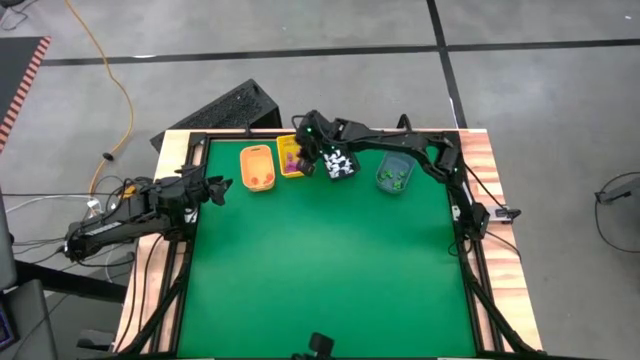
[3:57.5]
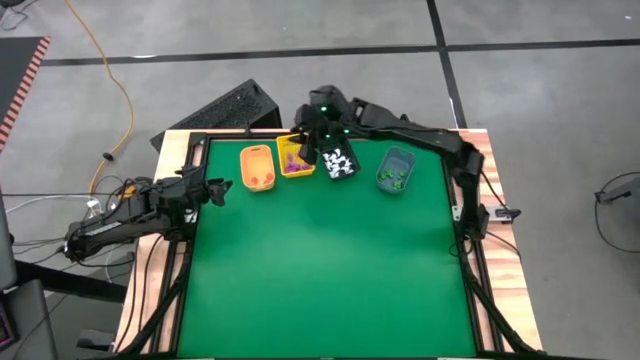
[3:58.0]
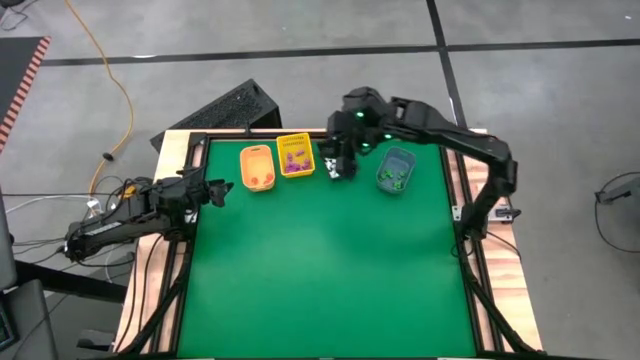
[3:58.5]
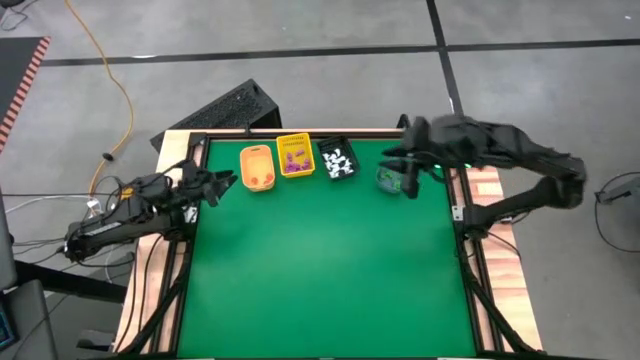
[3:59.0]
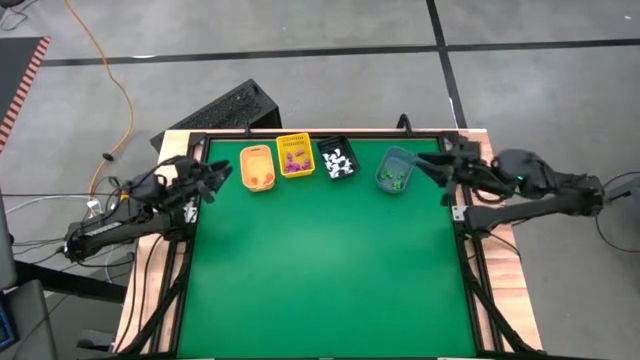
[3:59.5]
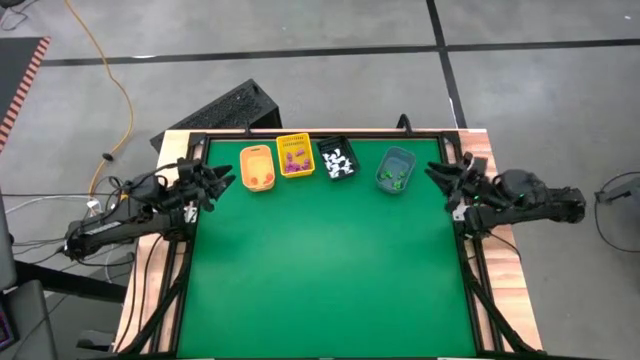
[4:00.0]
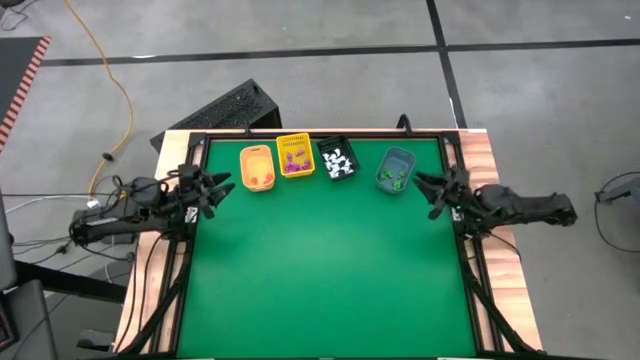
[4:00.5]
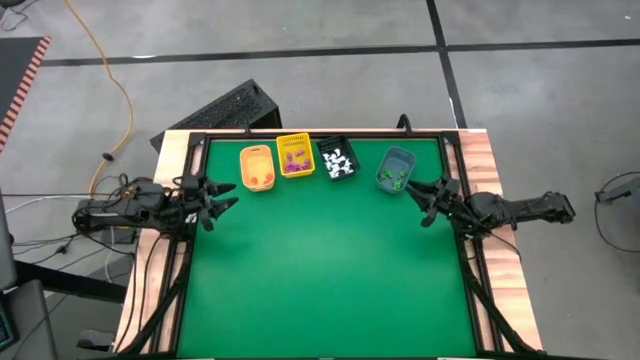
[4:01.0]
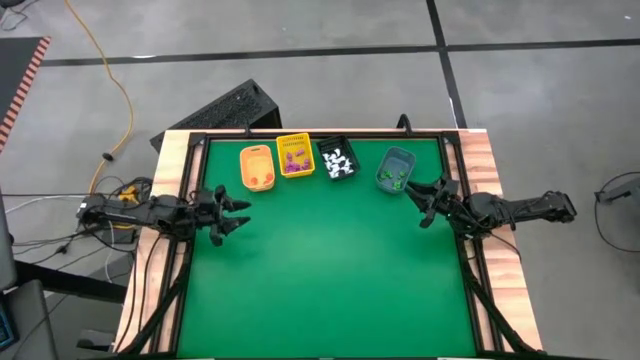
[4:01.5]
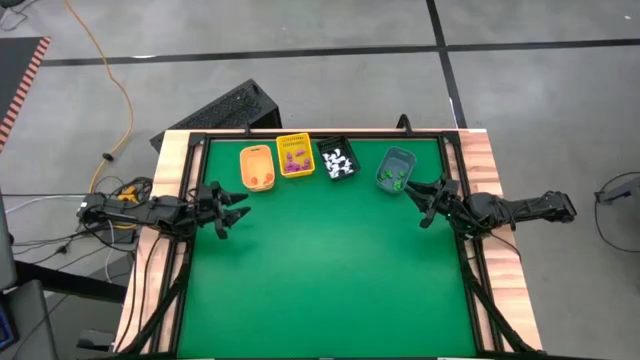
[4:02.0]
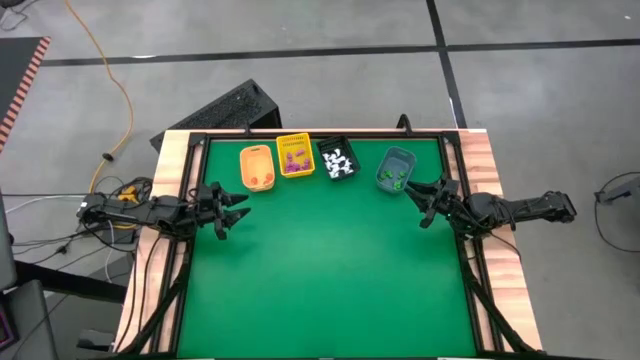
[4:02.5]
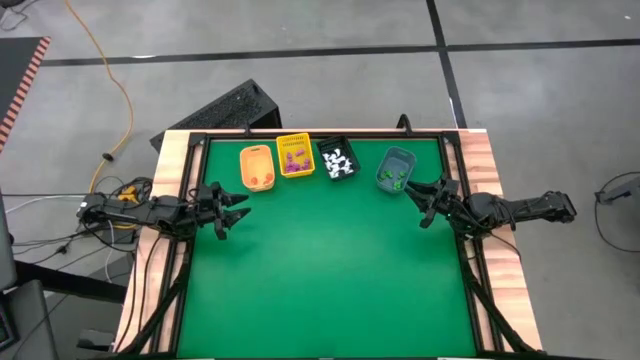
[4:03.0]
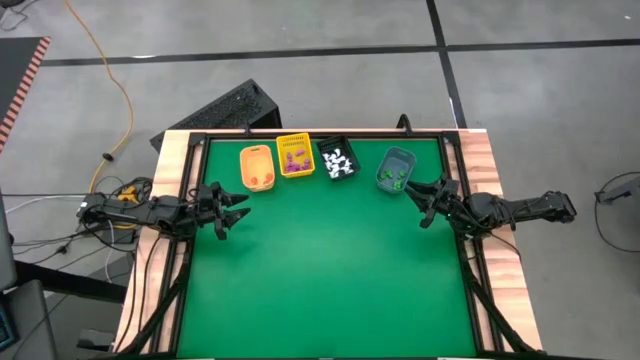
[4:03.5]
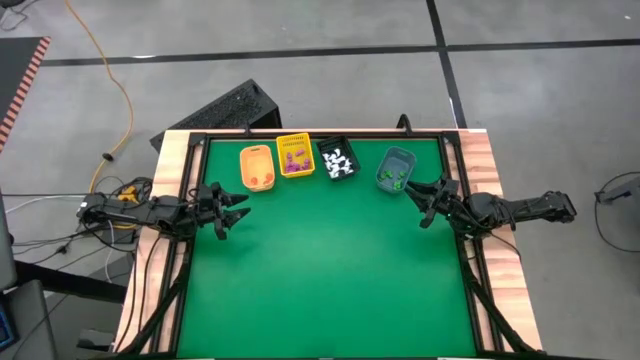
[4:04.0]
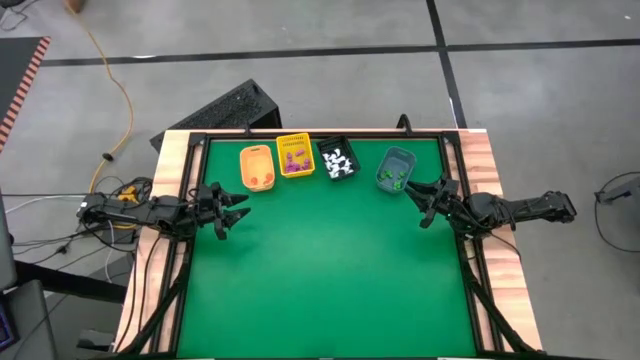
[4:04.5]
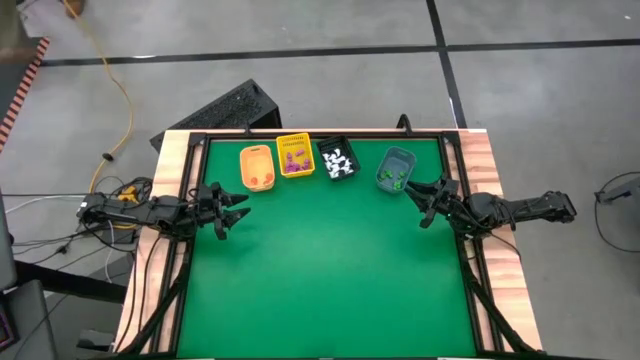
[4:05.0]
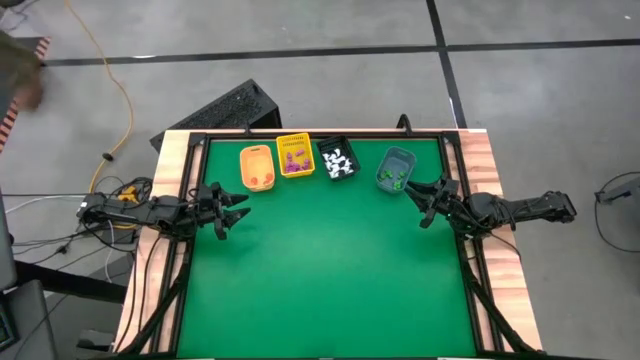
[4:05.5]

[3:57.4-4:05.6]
Task: Sort Halloween decoration
Return to Home Position

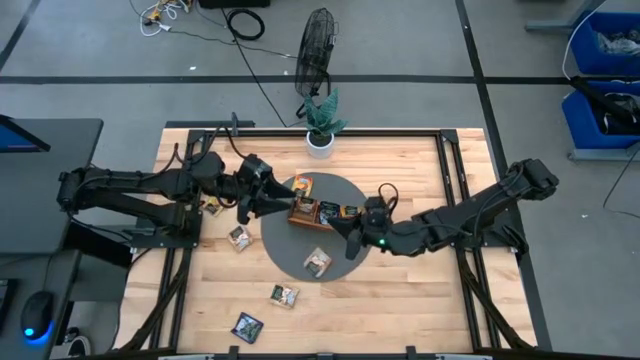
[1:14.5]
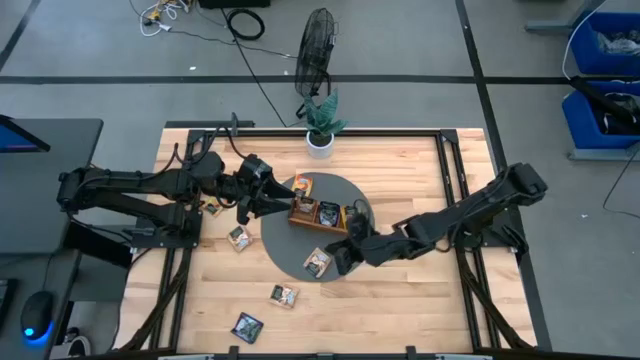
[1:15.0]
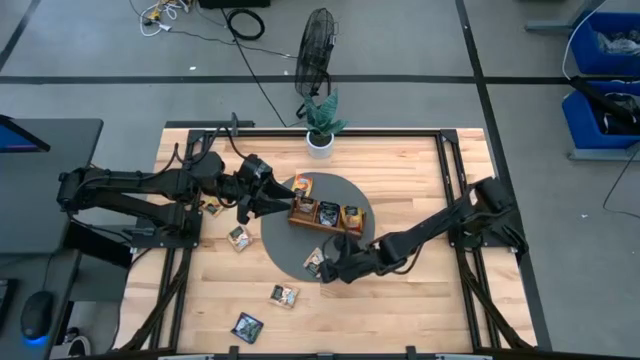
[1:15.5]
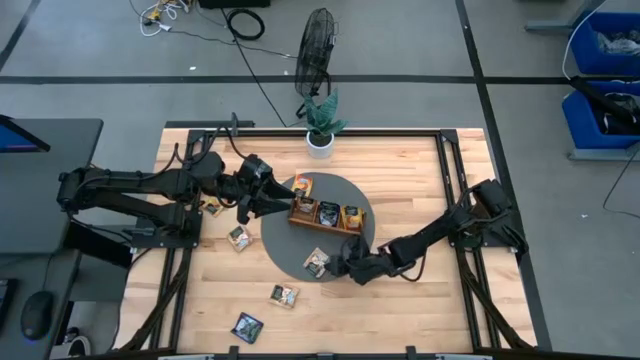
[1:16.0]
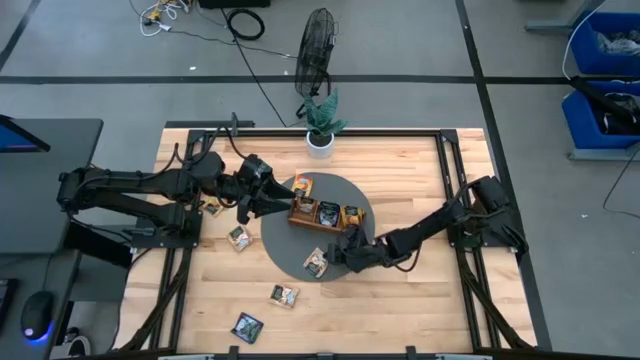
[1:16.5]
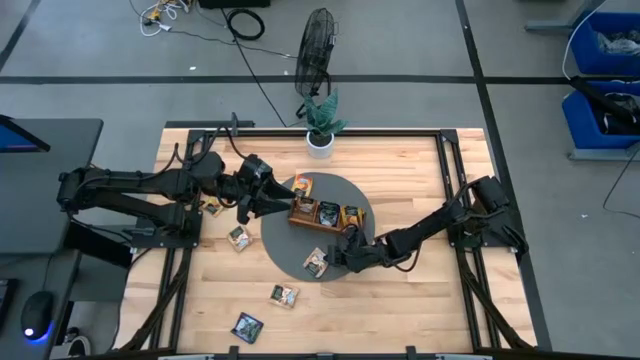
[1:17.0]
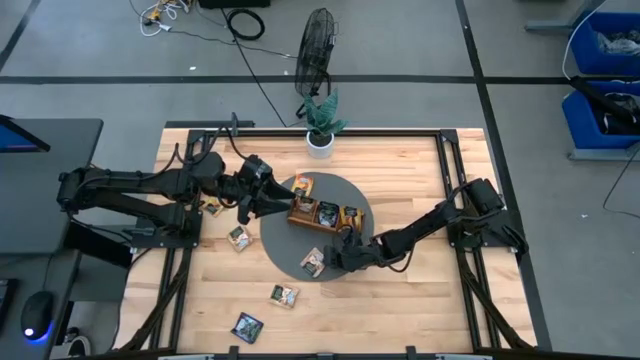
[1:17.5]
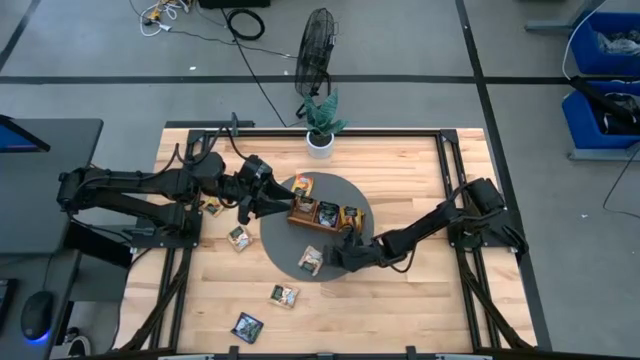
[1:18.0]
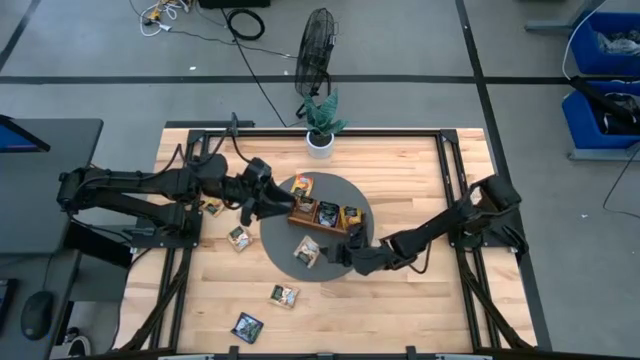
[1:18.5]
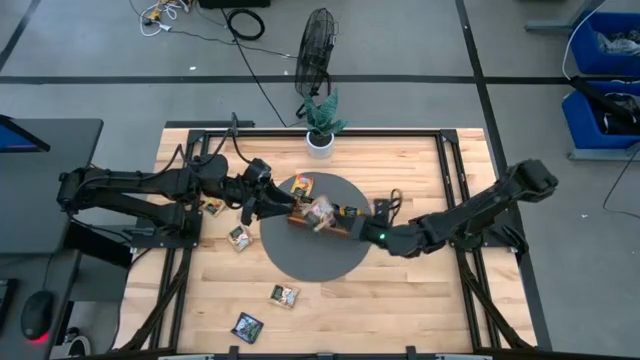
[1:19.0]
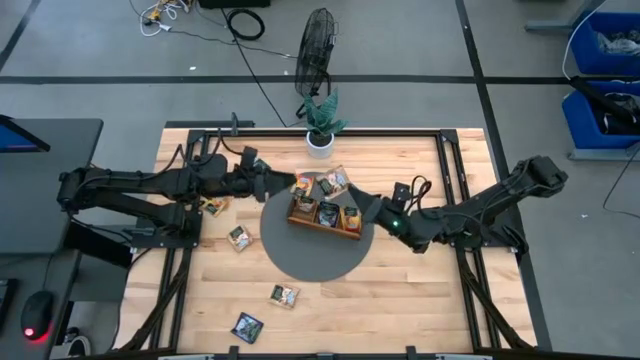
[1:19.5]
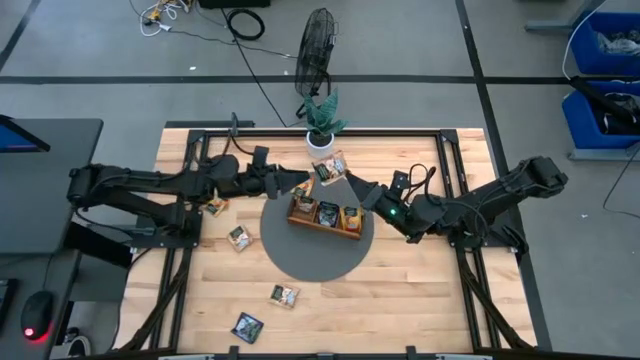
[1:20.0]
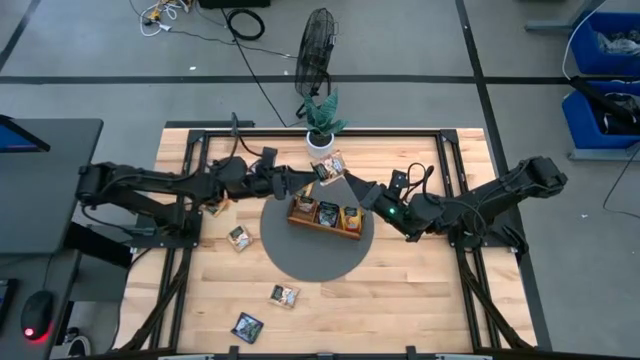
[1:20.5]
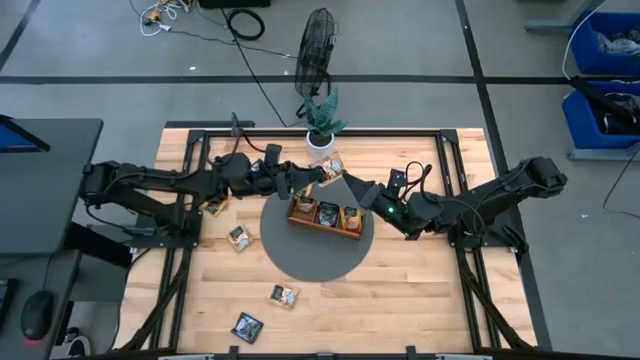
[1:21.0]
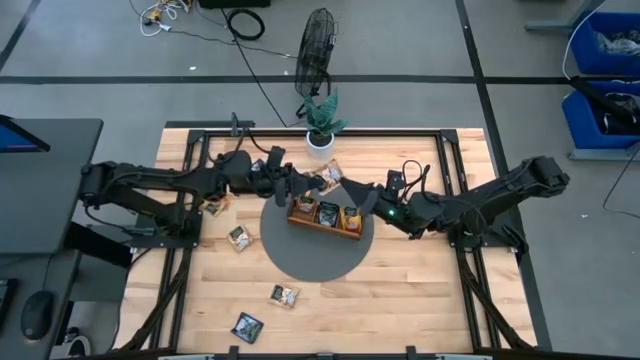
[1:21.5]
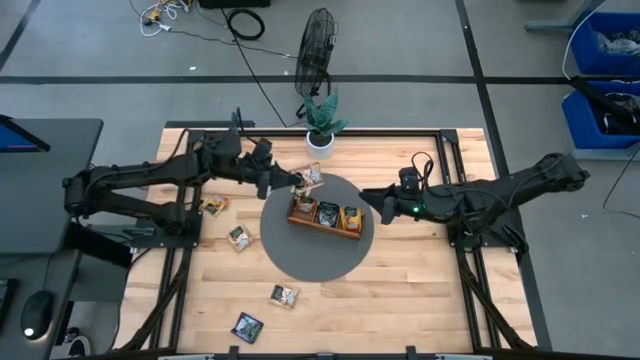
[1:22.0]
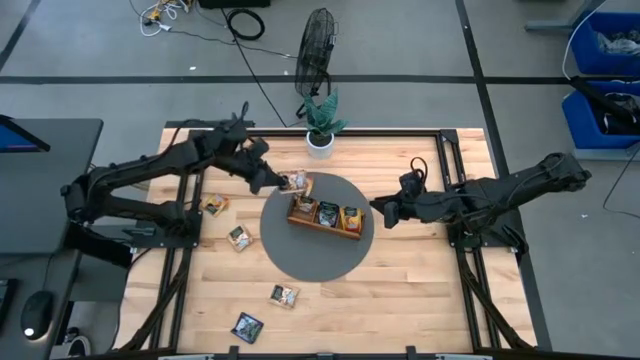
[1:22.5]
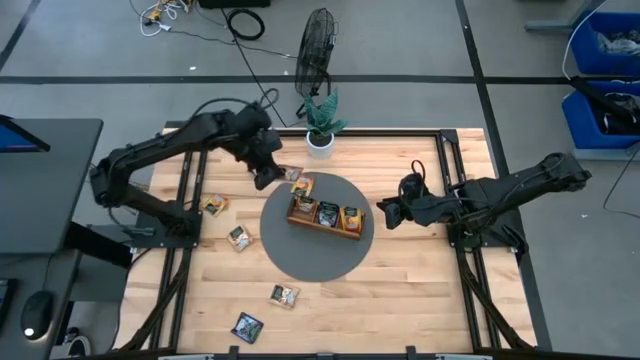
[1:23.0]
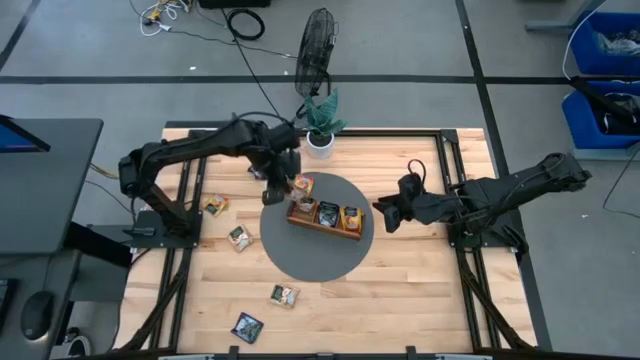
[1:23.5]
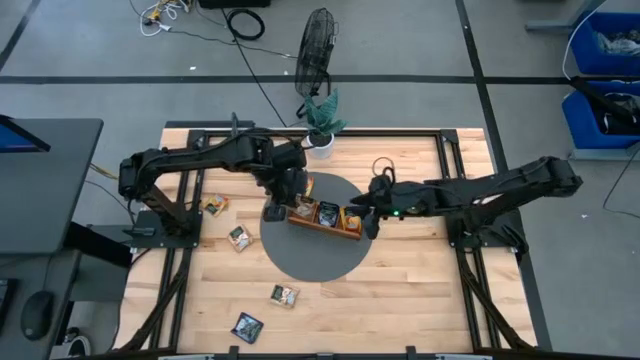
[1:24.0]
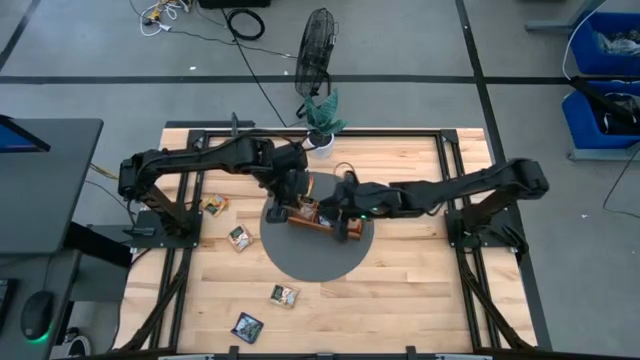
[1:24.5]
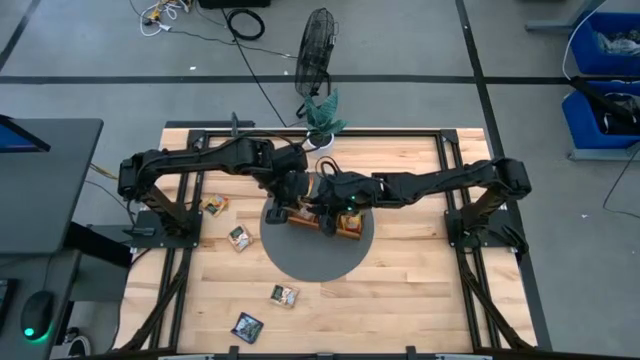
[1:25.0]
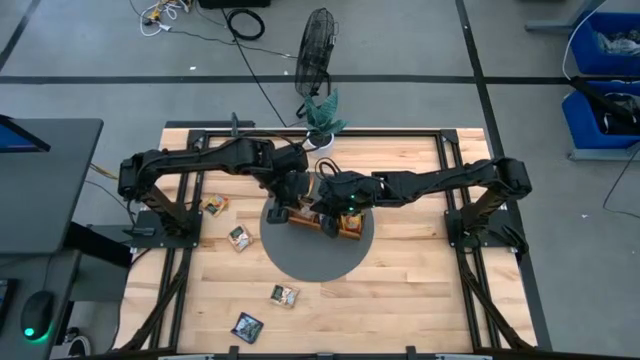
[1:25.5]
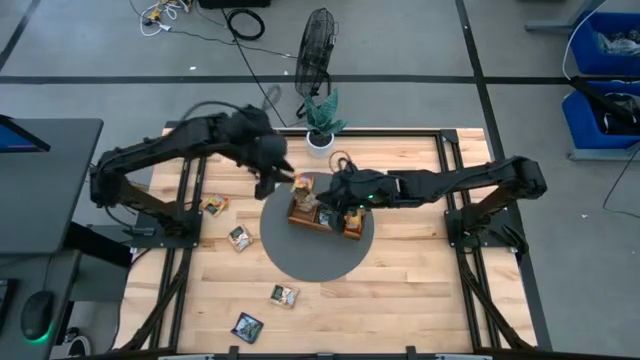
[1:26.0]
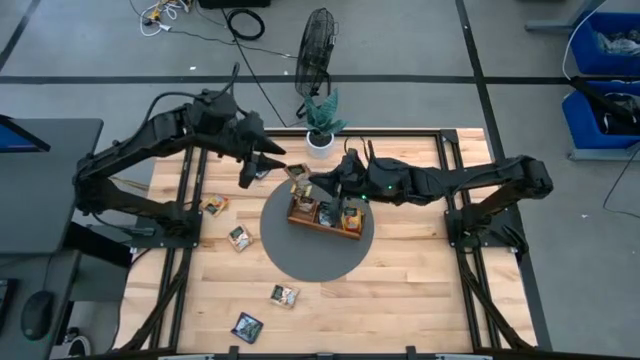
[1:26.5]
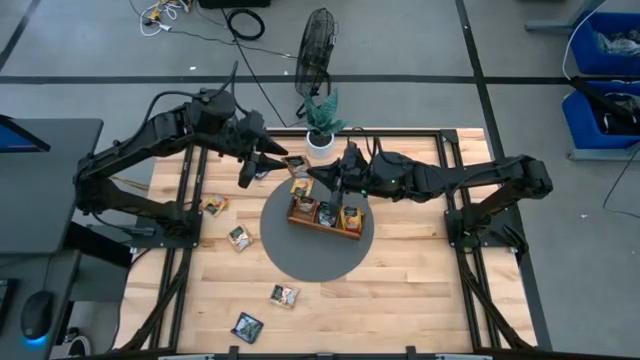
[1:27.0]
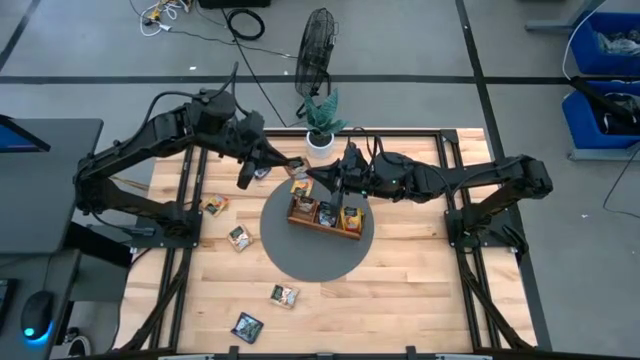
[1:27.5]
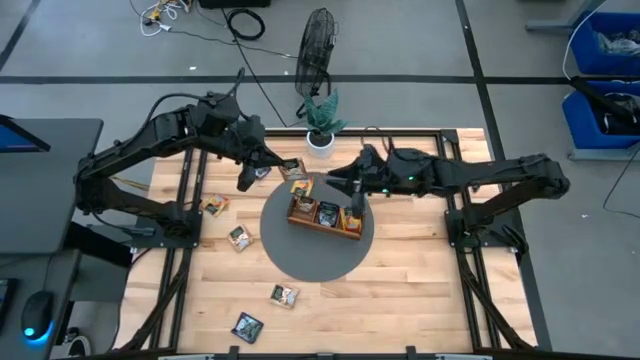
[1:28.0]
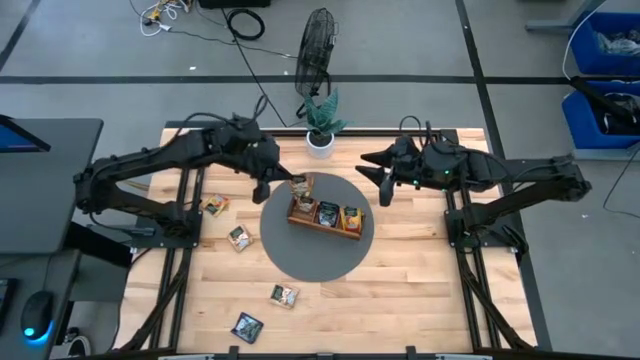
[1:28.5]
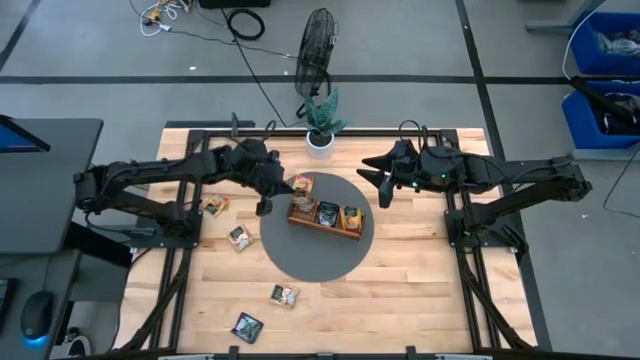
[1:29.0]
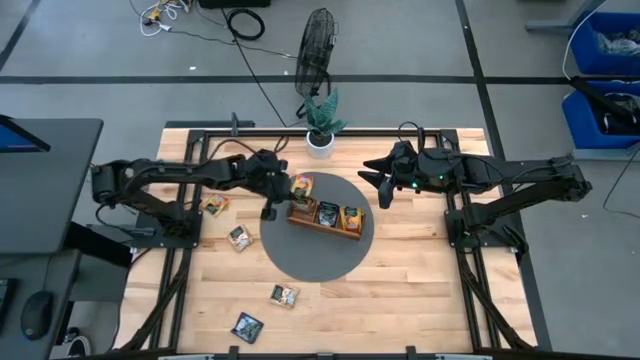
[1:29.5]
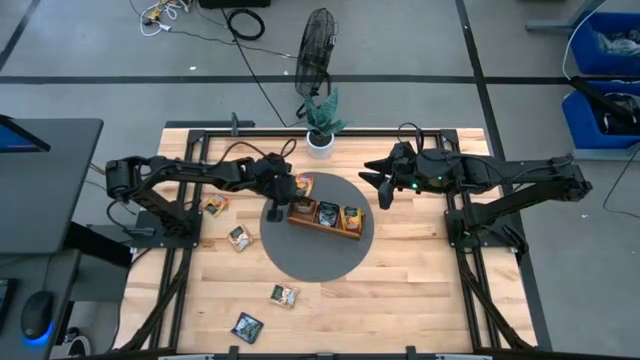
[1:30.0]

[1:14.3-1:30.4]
Task: Pick & Place Tea
Put the brown tea bag into the left section of the wooden organizer
